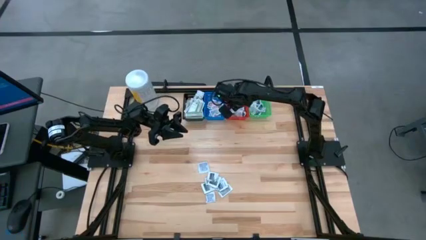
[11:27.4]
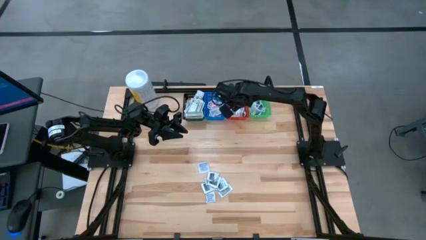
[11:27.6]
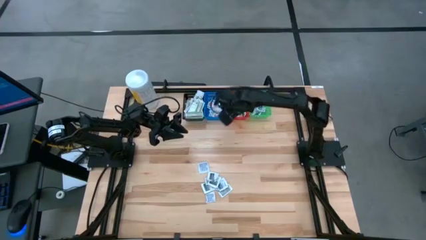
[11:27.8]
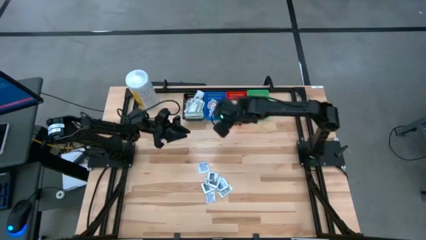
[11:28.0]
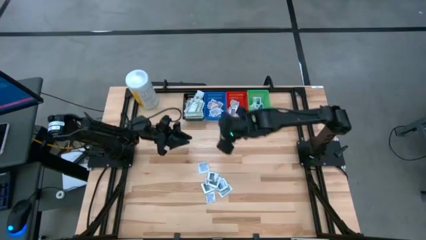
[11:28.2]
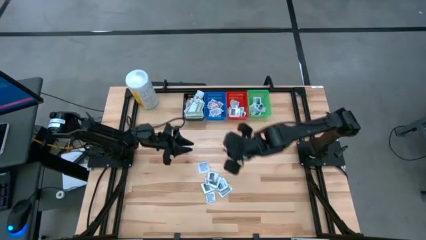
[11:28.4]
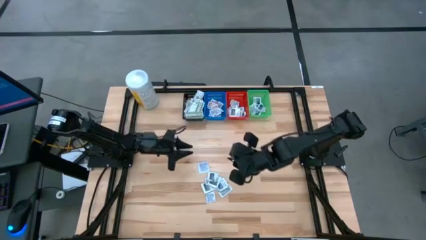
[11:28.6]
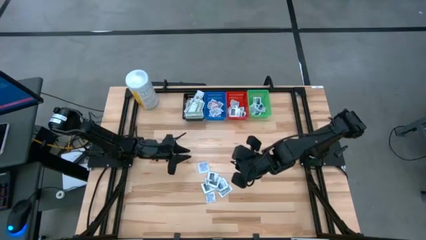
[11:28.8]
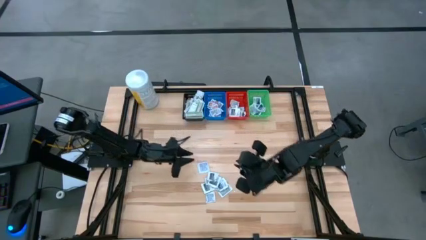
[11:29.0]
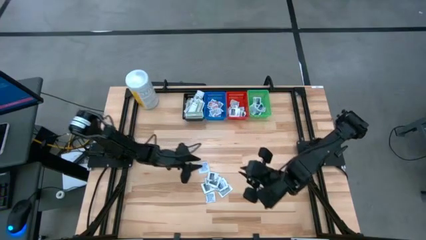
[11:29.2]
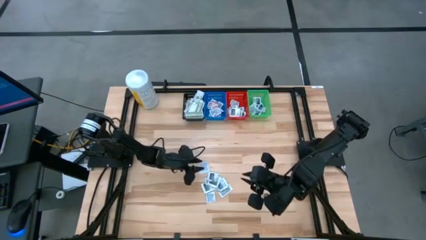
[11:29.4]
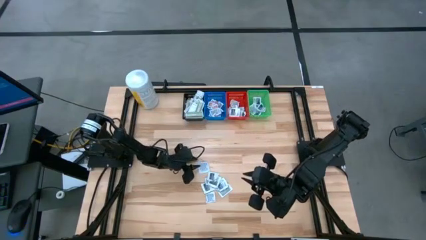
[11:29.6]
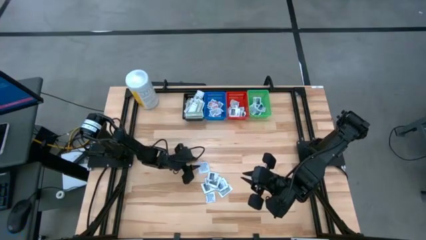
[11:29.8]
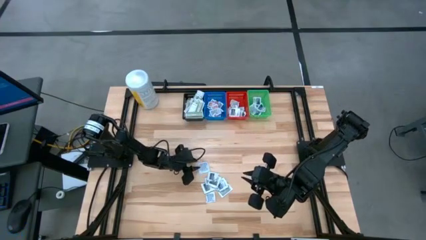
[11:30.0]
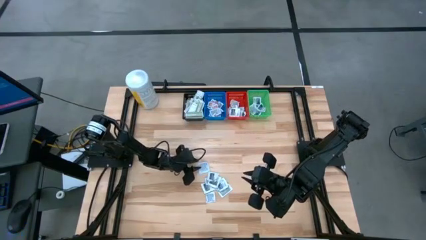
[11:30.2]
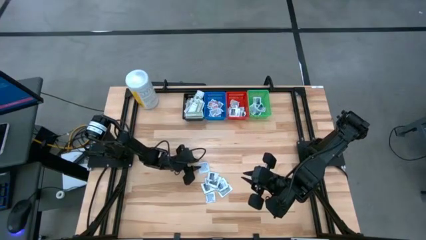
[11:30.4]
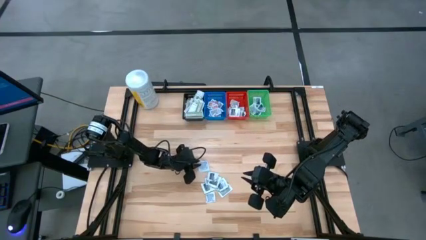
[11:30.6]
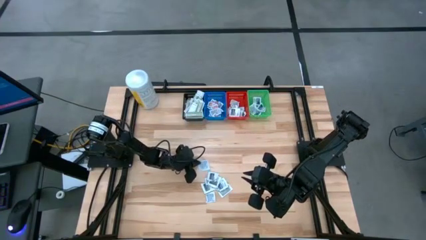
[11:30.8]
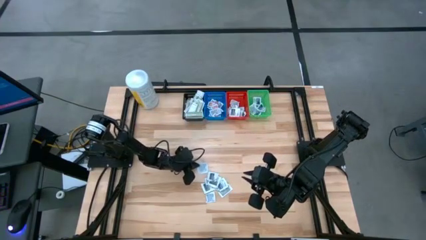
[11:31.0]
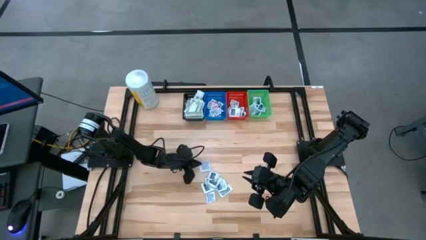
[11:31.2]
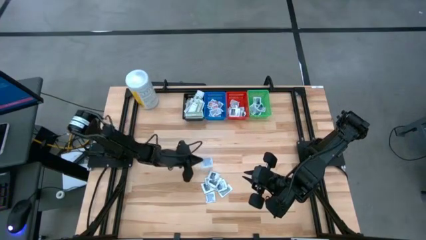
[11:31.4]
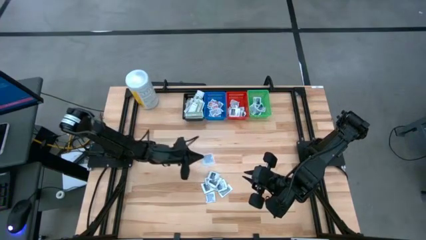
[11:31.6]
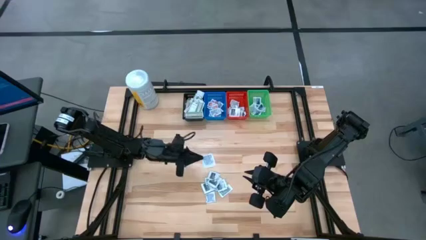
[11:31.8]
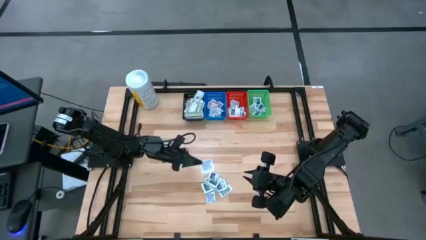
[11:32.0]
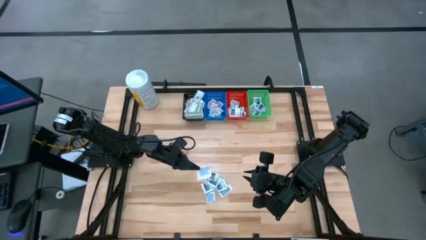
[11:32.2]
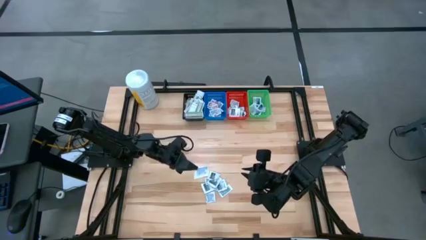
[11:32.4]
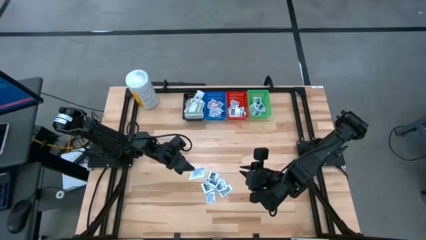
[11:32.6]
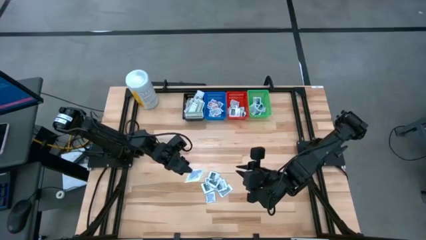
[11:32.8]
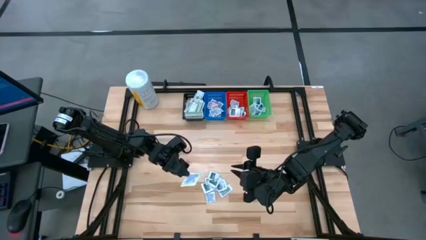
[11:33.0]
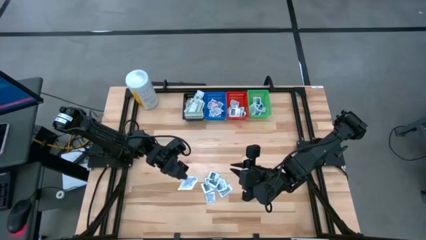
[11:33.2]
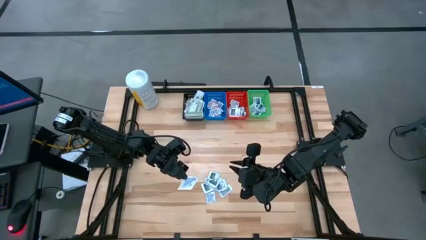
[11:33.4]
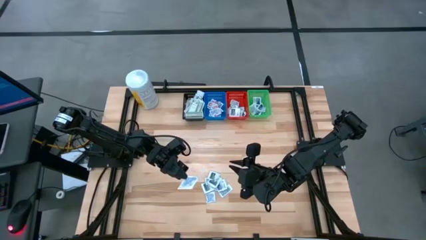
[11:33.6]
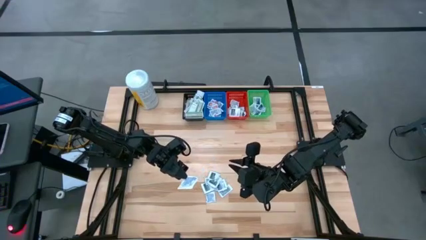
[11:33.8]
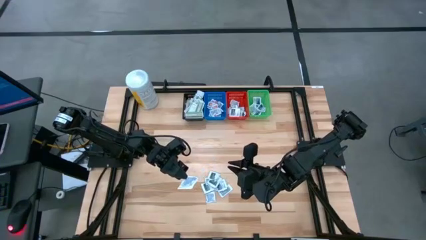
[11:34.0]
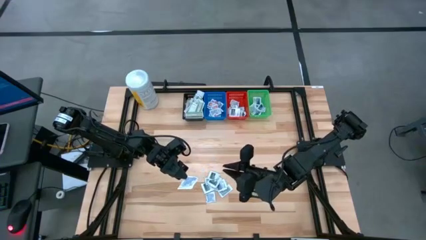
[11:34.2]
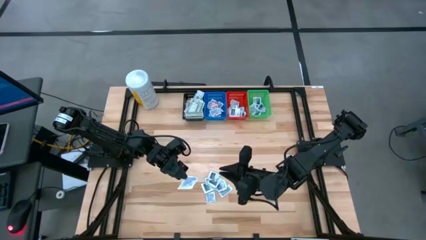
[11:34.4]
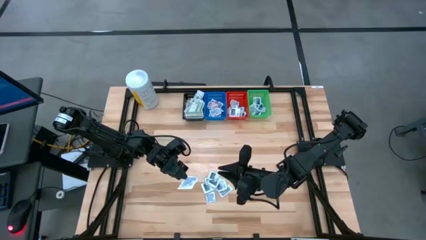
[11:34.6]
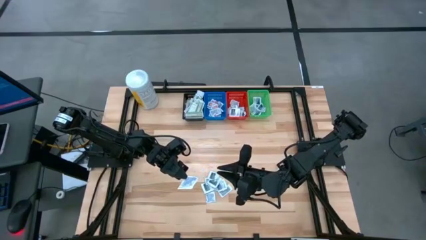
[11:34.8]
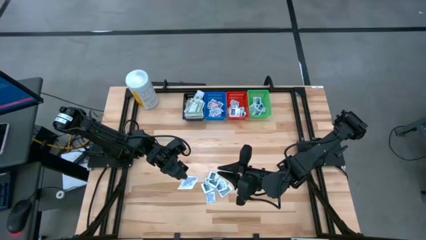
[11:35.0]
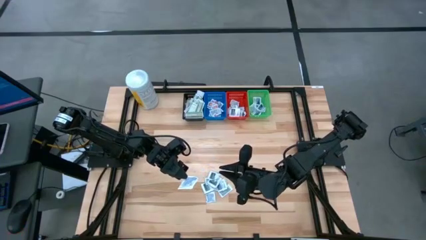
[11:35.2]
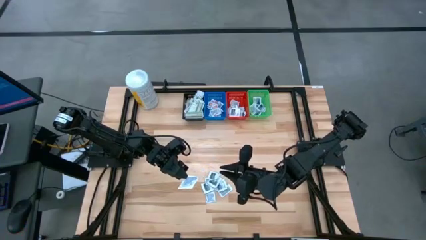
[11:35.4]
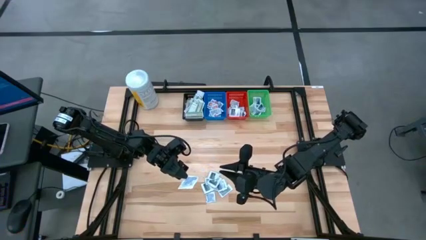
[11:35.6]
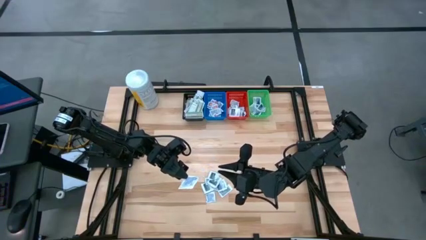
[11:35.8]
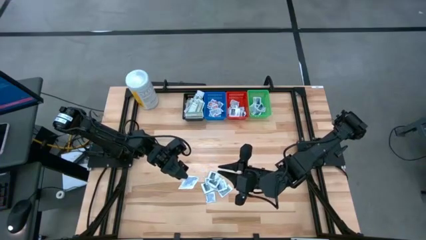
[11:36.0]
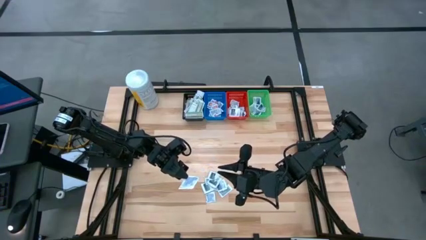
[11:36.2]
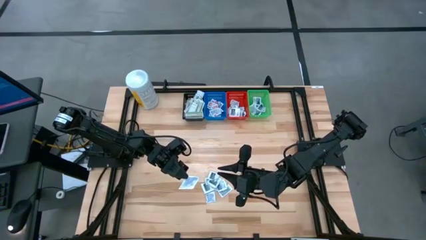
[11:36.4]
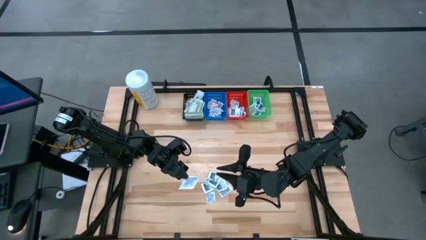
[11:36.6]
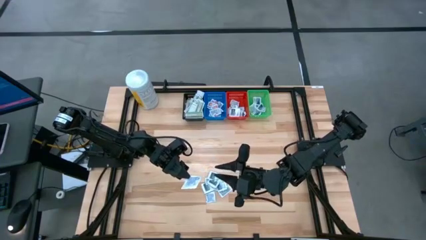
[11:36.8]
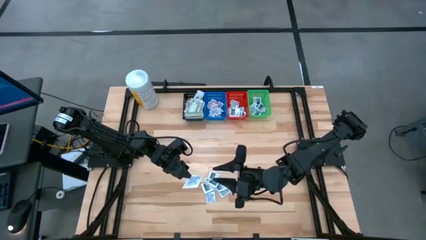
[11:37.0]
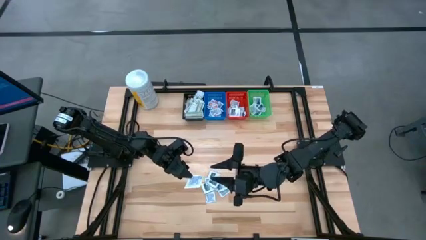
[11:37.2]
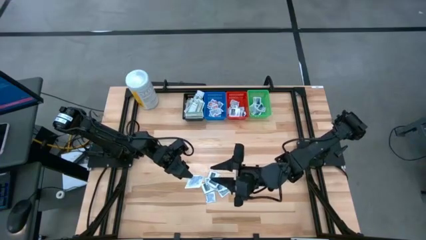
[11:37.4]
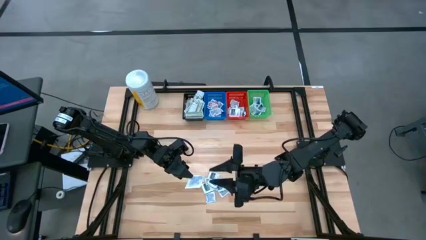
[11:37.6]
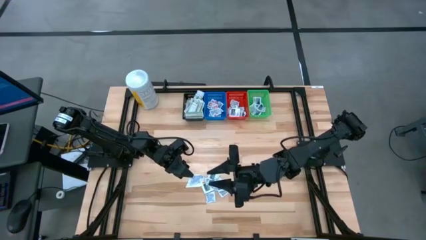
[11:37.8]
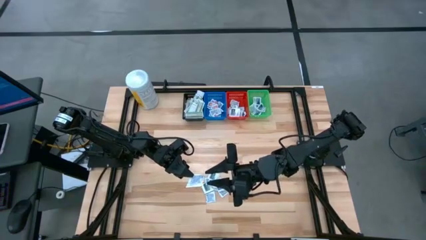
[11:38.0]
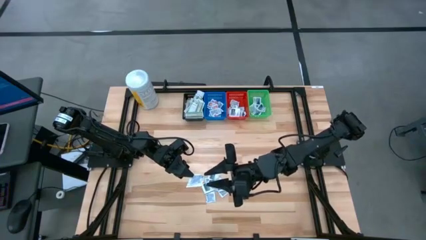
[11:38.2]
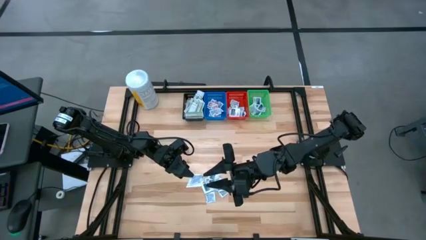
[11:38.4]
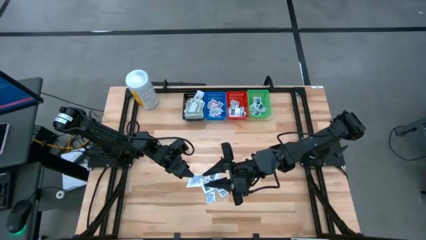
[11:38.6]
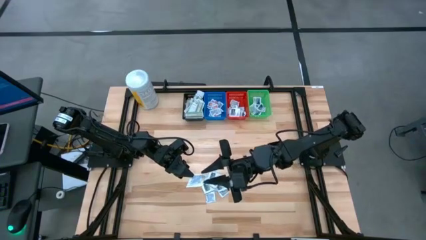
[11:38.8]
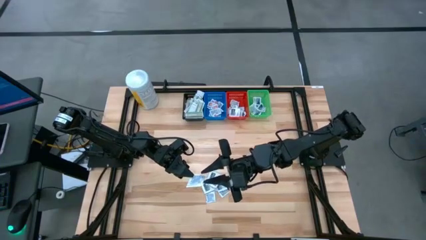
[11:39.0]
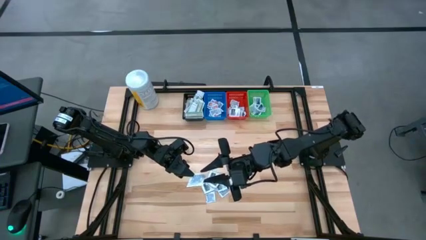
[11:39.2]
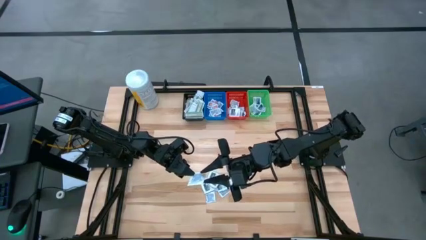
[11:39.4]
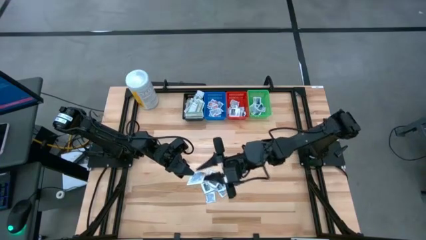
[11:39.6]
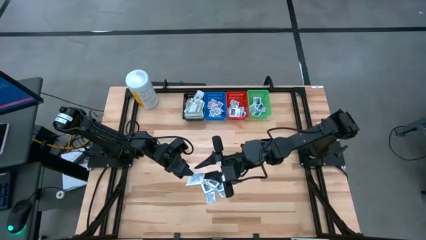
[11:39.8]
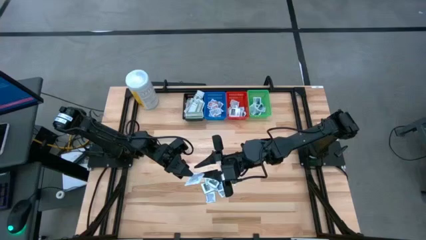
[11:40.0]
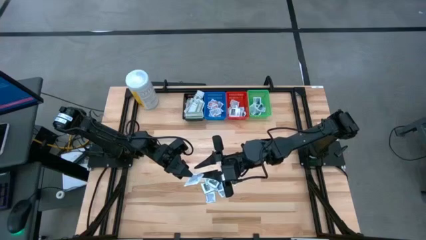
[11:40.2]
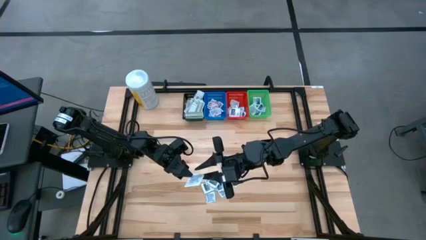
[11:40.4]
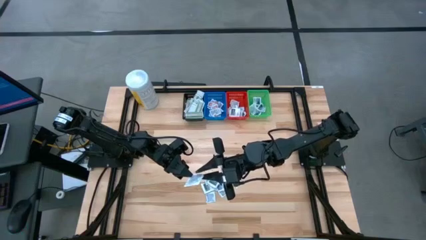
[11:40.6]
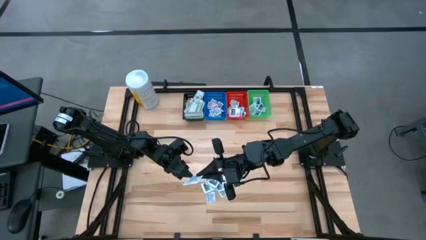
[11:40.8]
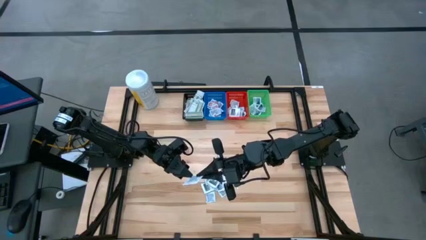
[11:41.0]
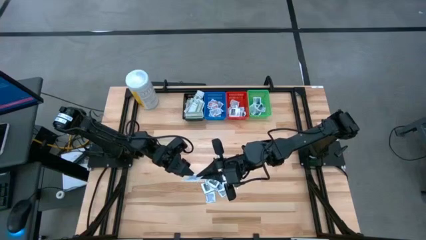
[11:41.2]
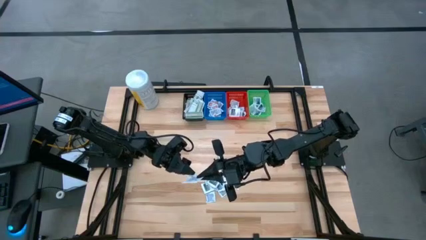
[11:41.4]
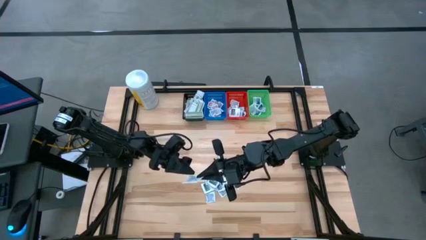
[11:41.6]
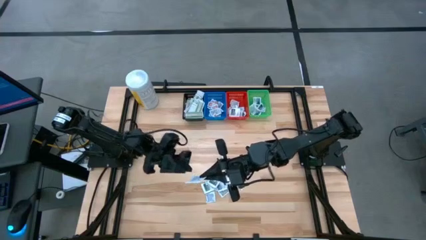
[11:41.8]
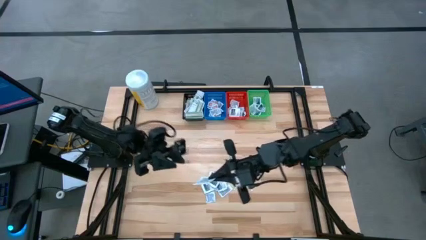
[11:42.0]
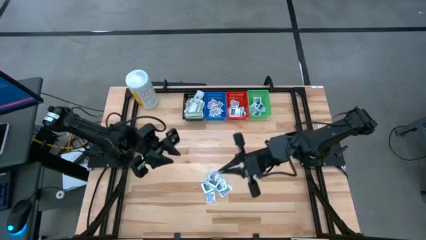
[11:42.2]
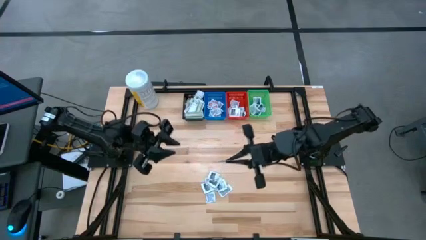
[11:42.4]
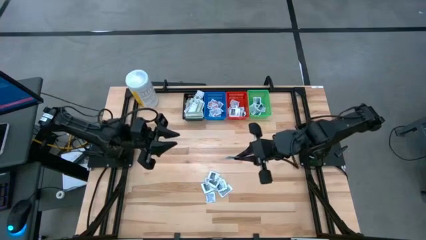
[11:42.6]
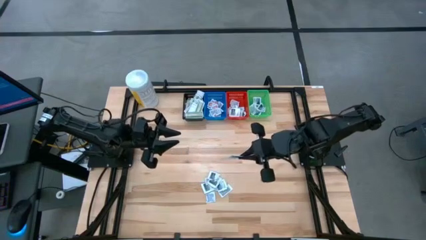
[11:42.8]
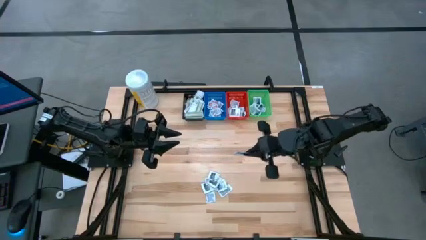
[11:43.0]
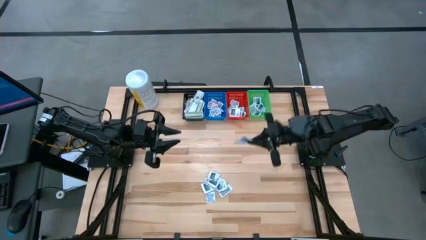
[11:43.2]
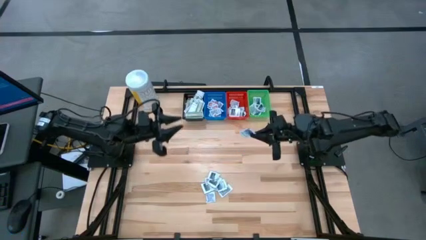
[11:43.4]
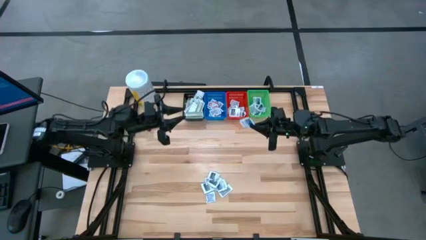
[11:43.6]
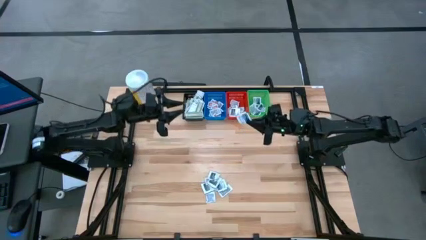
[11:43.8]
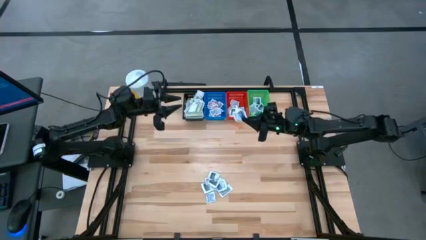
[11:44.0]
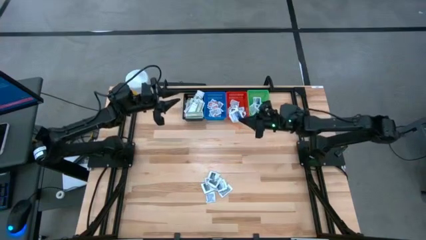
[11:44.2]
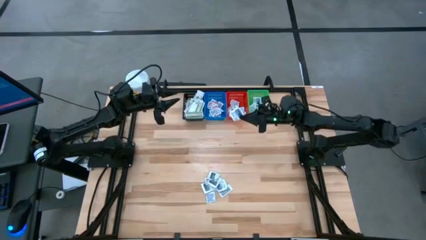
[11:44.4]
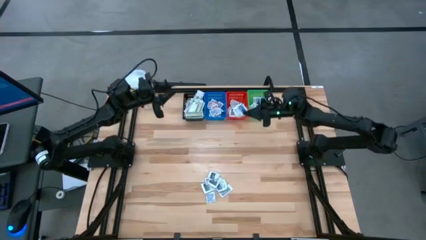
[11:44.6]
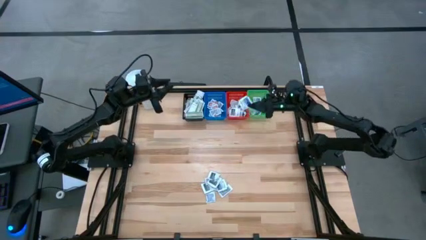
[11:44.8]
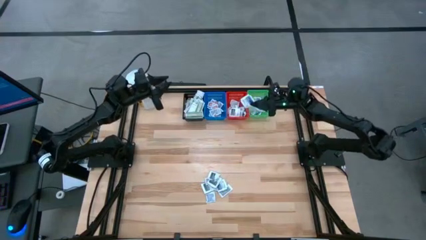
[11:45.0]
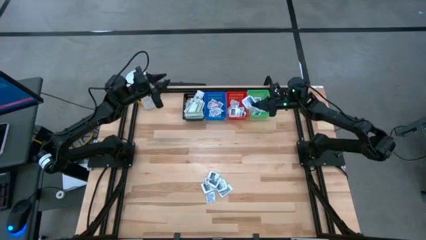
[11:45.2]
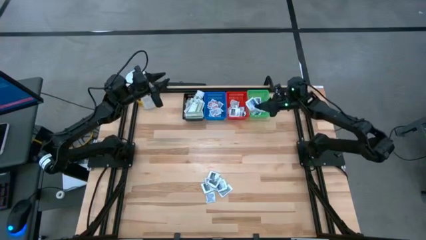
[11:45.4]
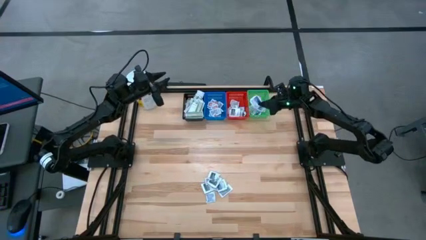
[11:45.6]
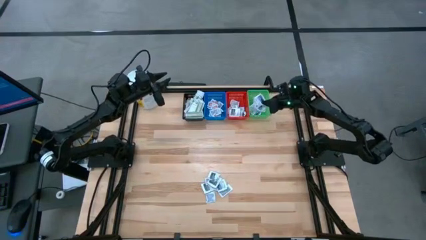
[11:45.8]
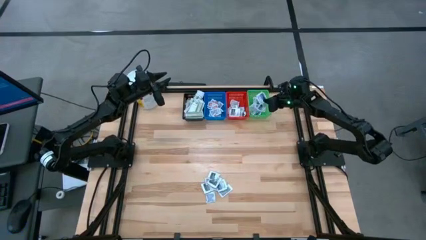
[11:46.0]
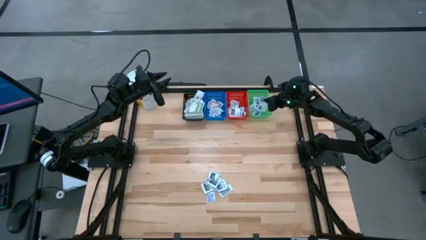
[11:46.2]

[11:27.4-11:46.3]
Task: Pick & Place First Aid Supplies
Put the blue alcohol pad in the green bin
